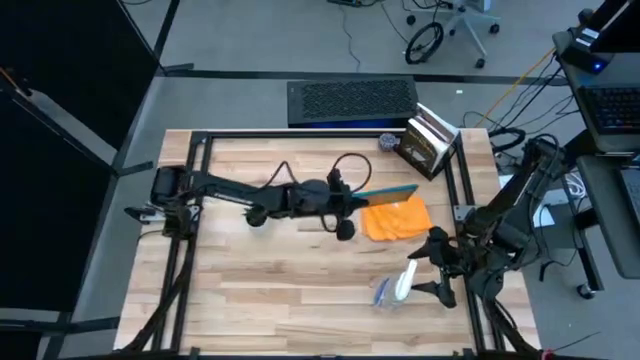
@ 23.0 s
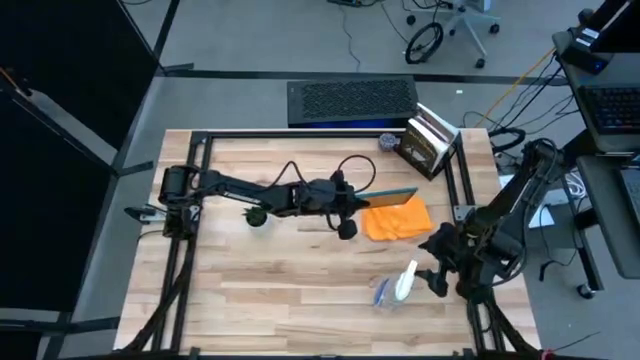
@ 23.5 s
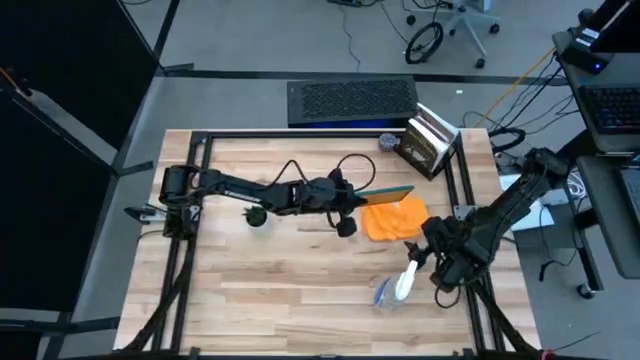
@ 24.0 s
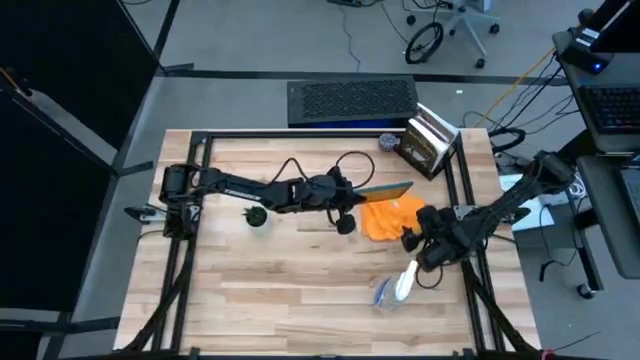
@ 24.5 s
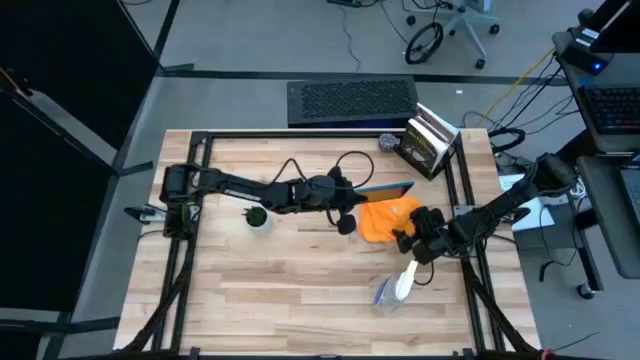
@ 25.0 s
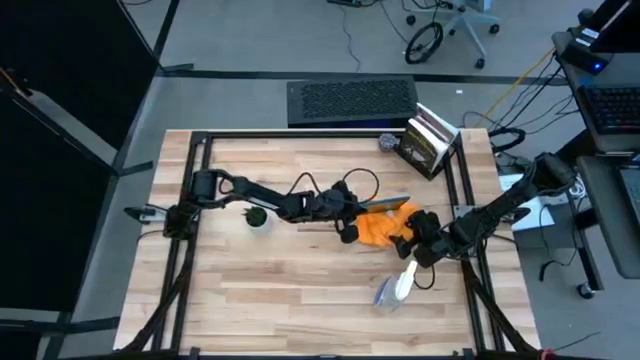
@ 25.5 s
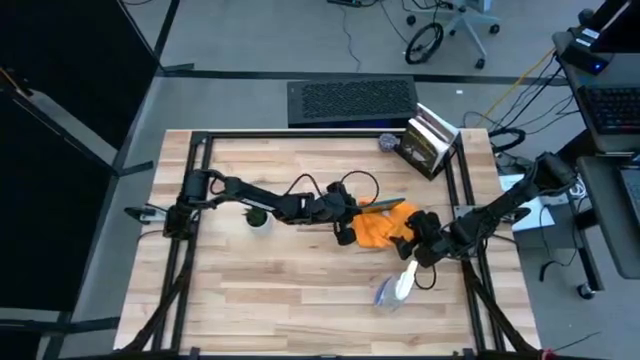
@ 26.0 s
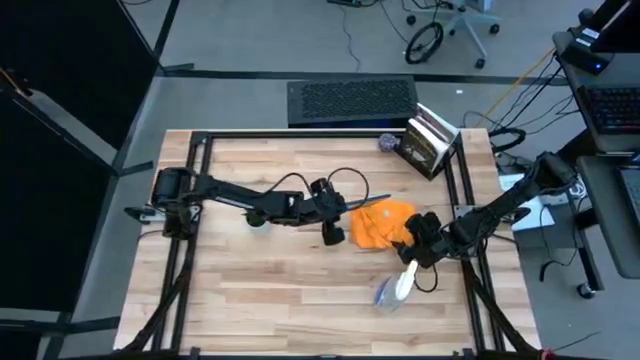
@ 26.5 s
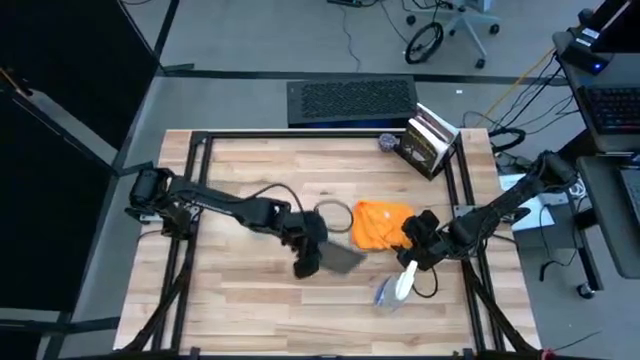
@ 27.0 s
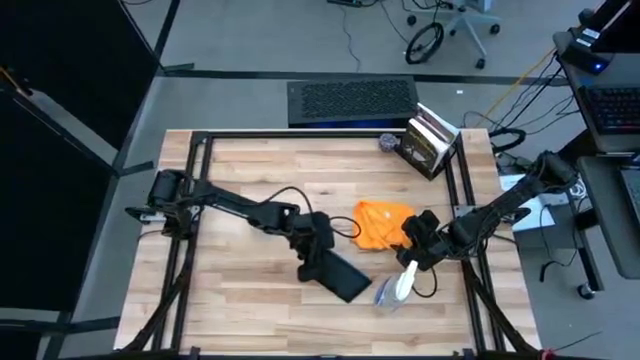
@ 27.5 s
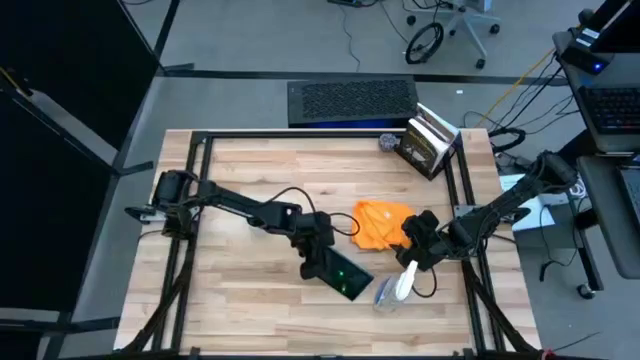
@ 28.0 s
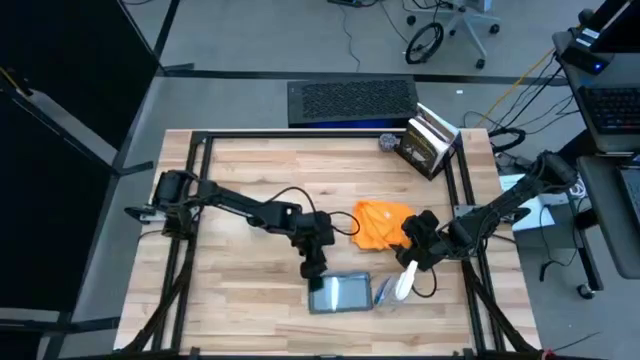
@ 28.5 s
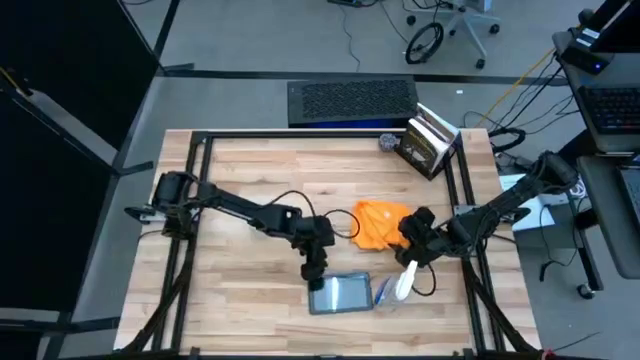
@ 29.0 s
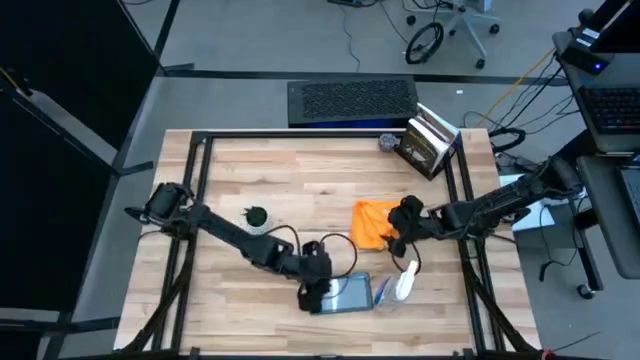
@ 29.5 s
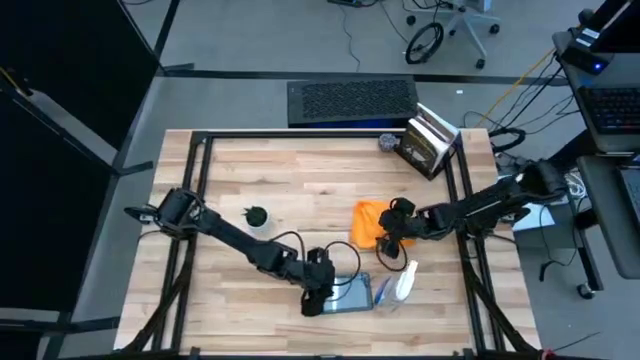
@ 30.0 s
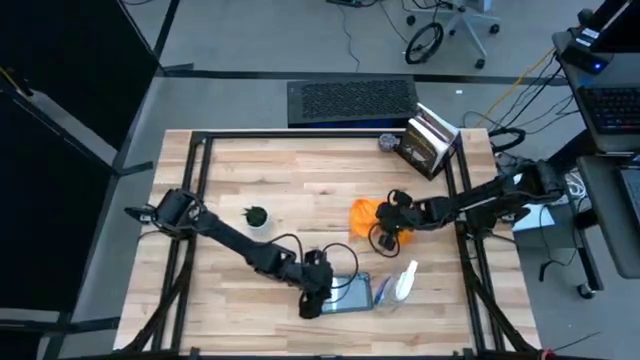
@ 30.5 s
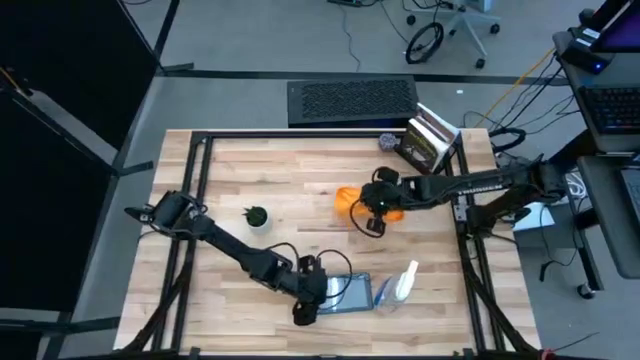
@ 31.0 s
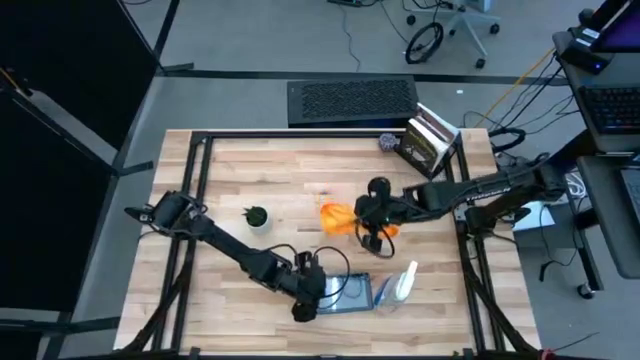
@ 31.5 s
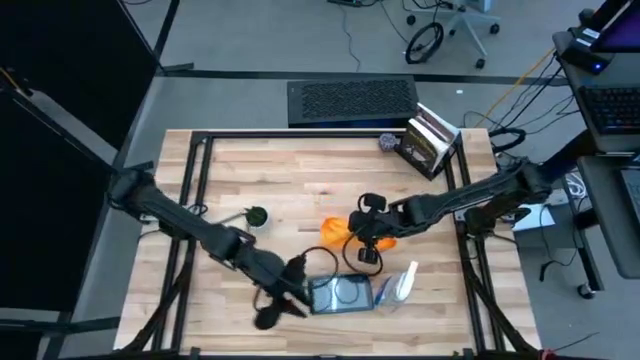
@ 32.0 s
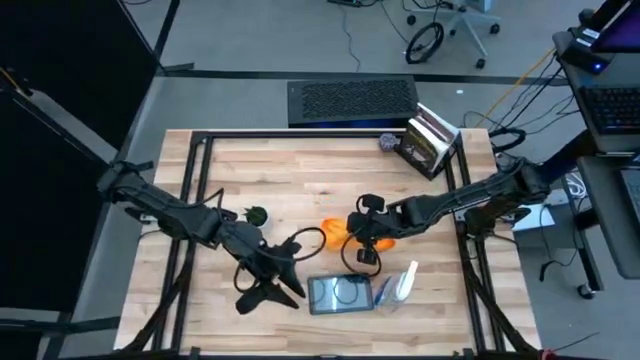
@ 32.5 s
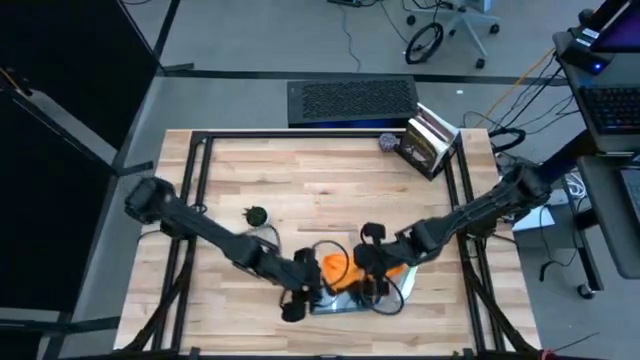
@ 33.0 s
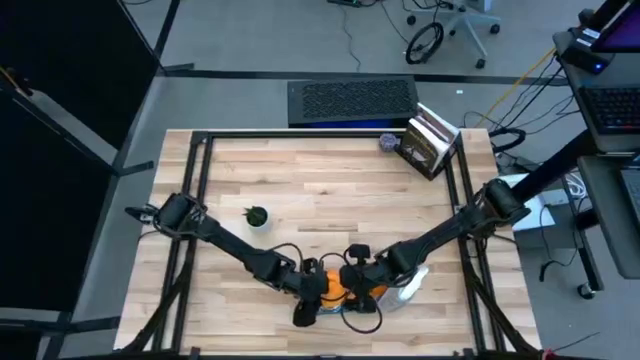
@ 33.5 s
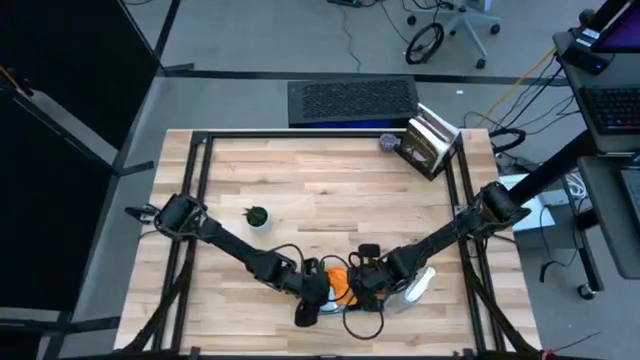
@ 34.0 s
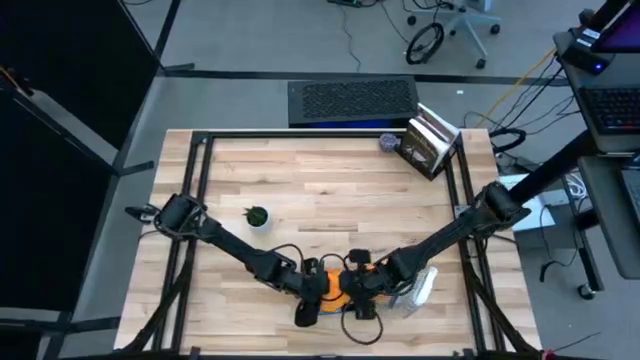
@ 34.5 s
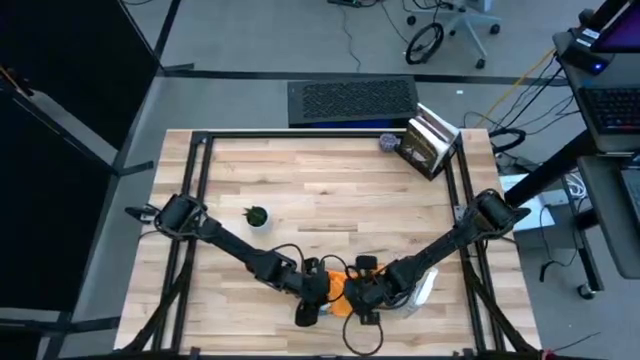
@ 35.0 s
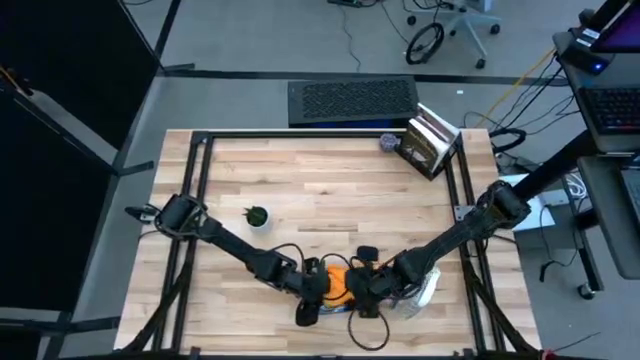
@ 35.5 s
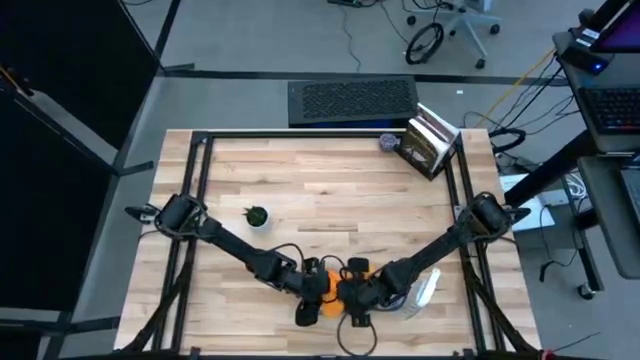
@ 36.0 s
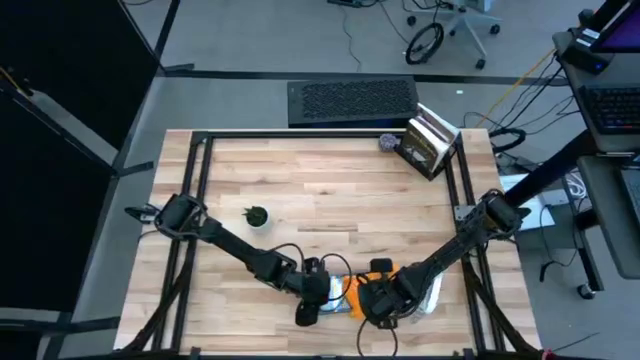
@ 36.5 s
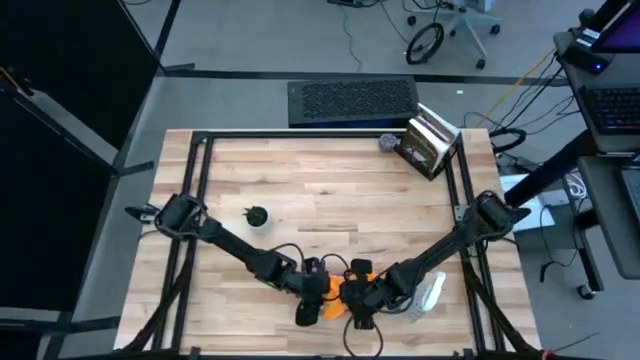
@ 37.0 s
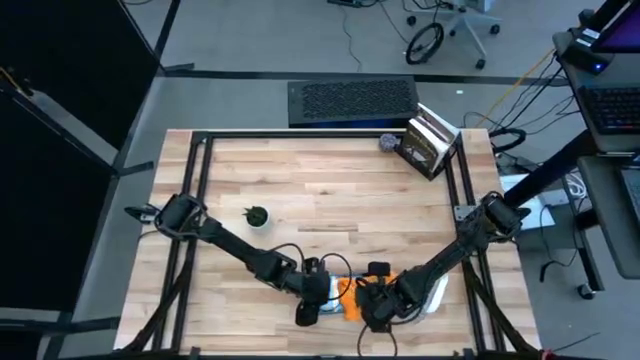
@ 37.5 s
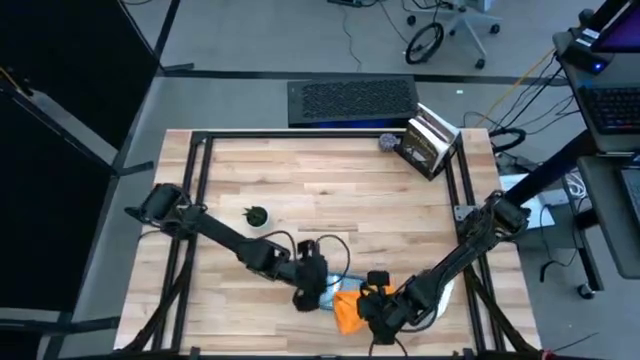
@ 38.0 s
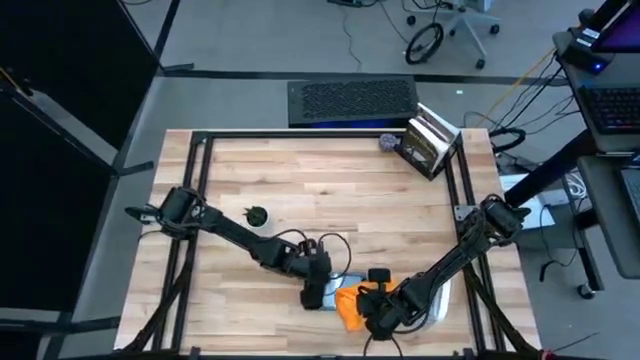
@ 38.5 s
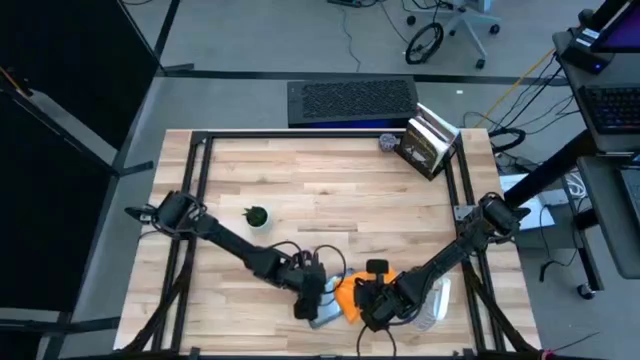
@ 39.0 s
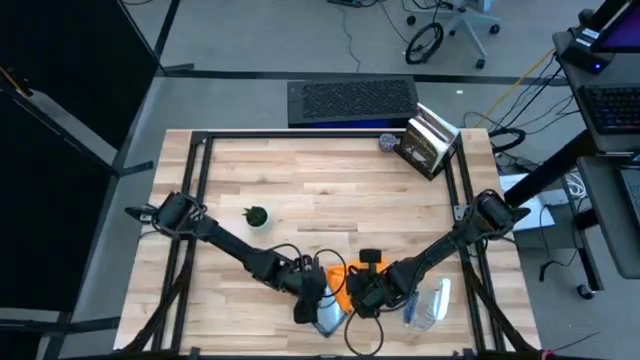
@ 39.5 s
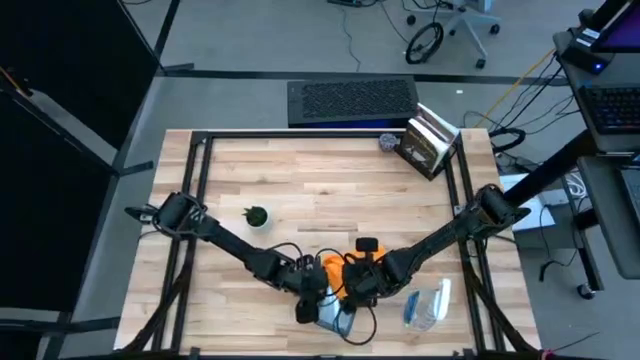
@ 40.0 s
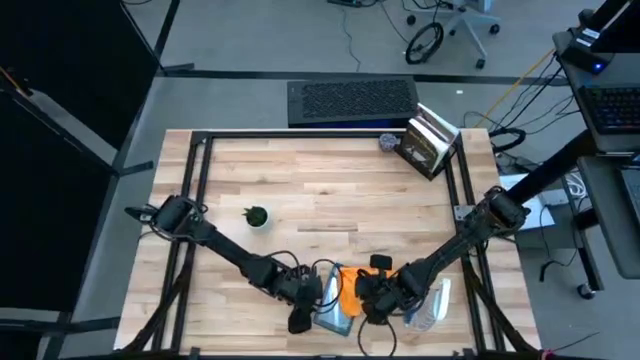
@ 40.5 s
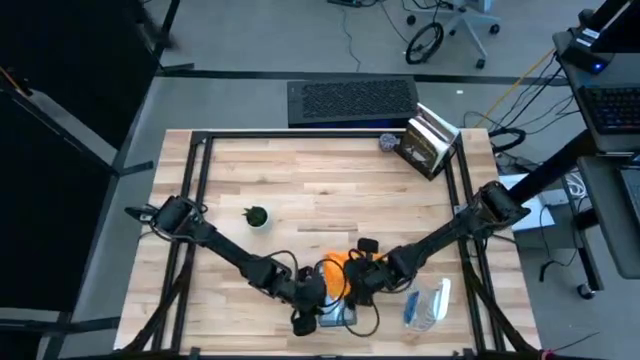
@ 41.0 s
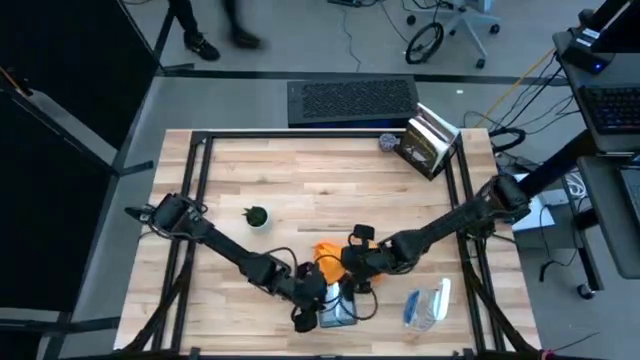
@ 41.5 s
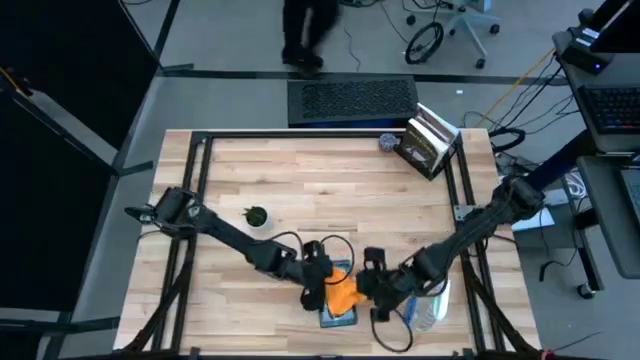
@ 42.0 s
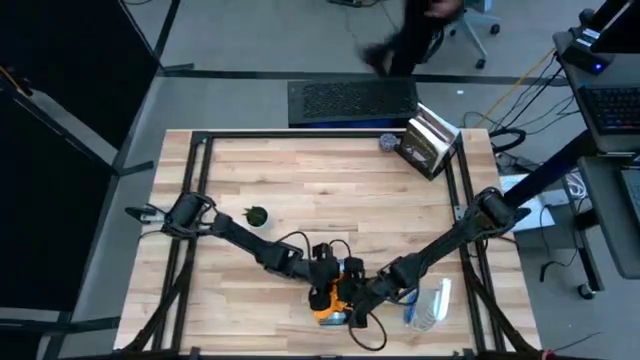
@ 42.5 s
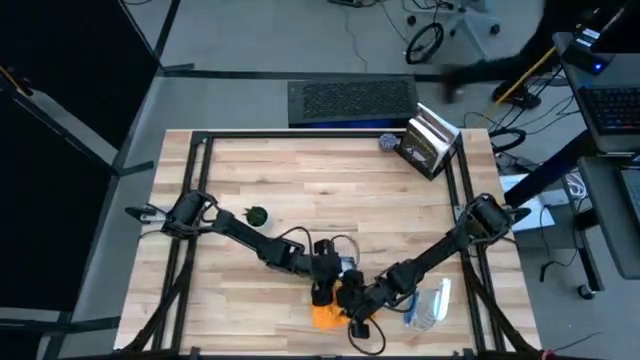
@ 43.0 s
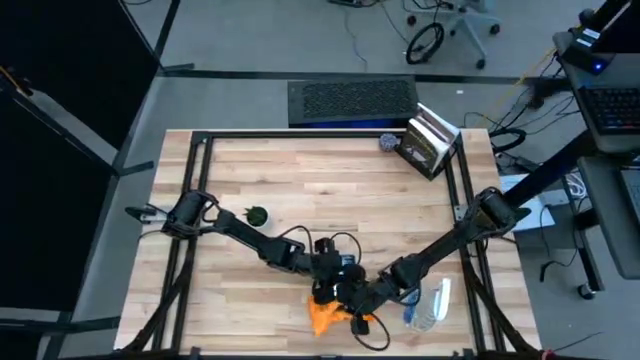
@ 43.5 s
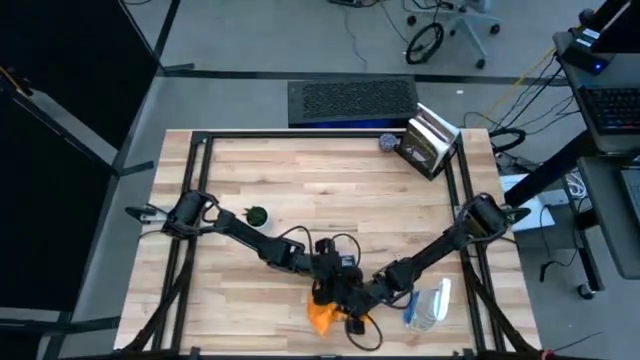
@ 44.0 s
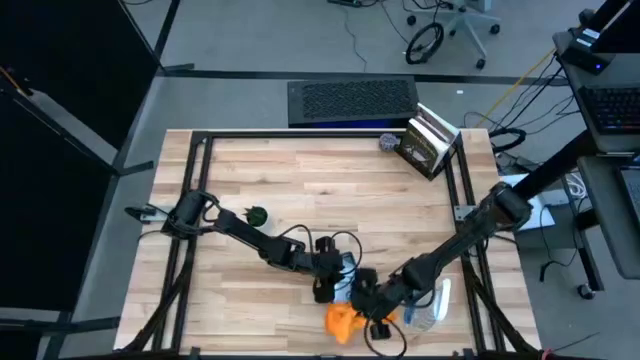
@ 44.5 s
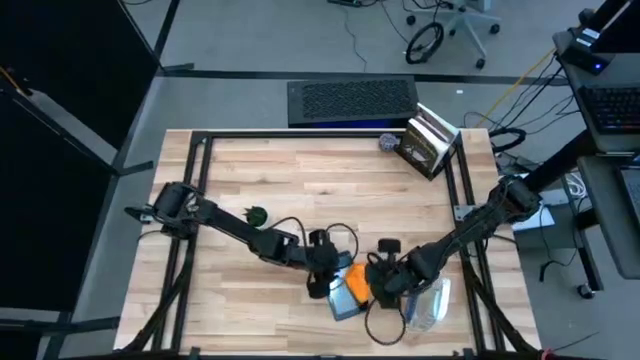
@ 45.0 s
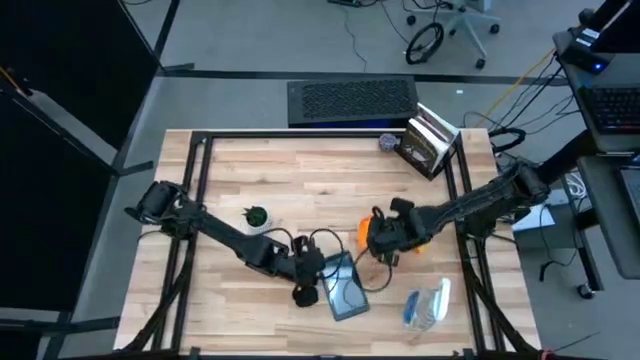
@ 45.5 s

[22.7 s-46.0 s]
Task: Apply microfiber cloth
Wipe the blue tablet with the orange microfiber cloth
